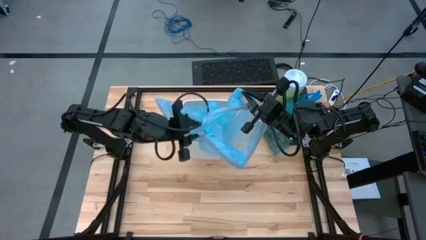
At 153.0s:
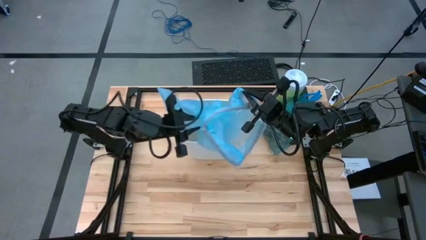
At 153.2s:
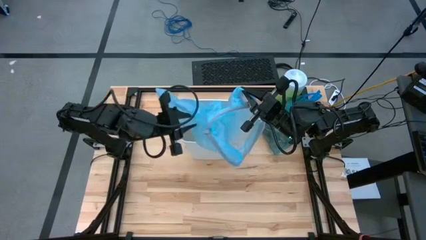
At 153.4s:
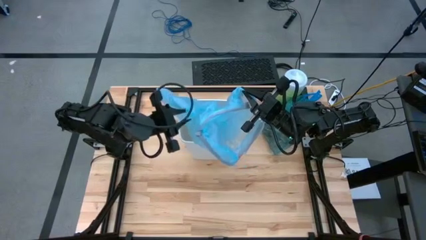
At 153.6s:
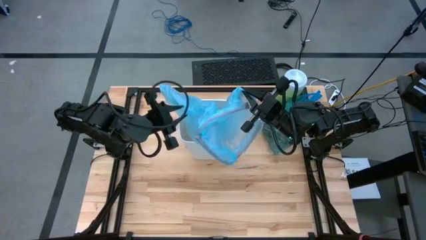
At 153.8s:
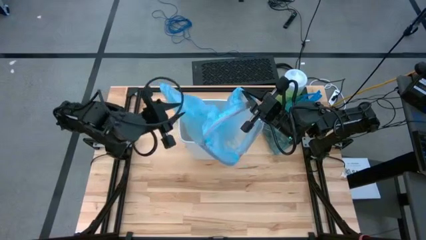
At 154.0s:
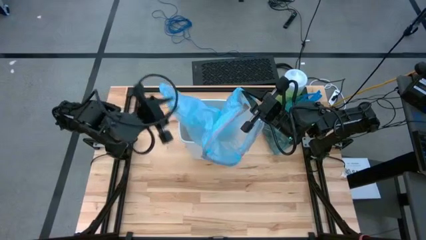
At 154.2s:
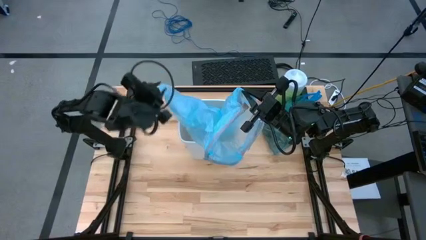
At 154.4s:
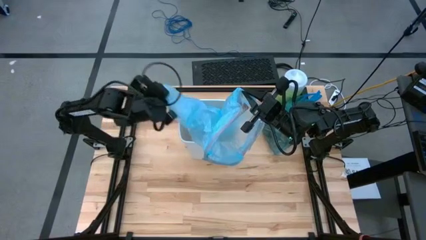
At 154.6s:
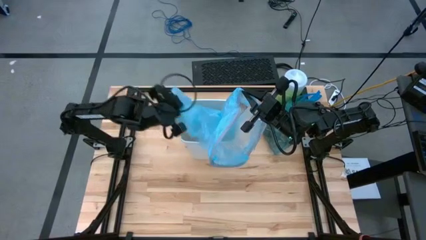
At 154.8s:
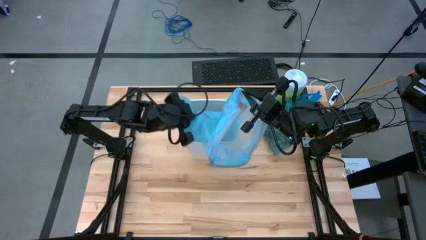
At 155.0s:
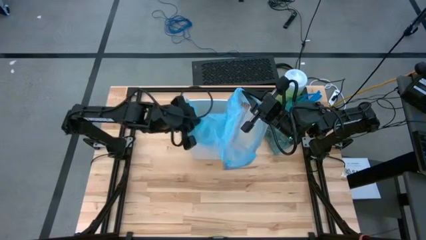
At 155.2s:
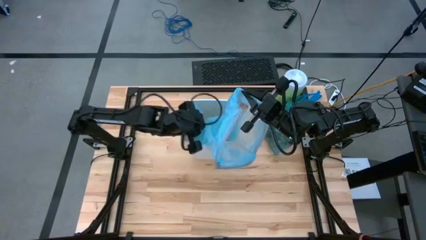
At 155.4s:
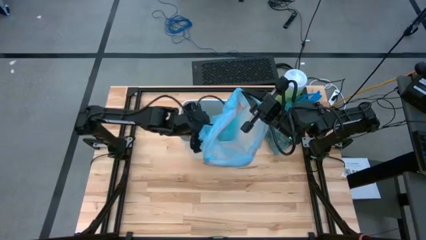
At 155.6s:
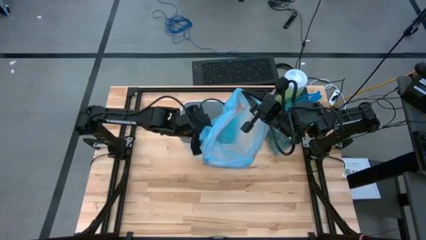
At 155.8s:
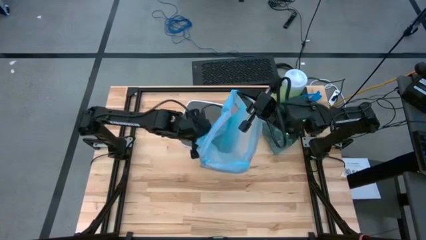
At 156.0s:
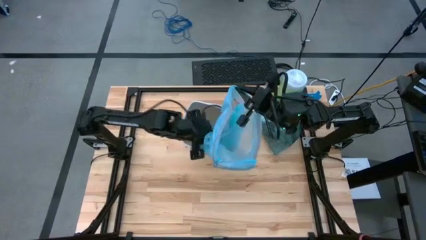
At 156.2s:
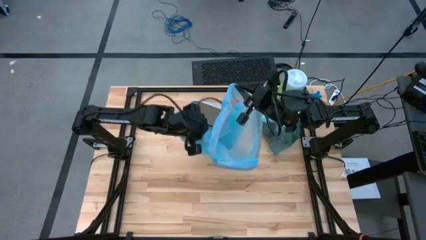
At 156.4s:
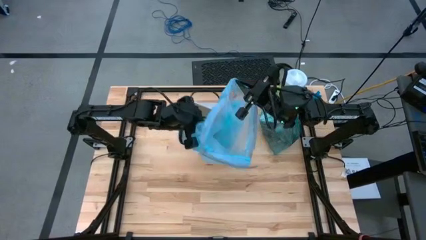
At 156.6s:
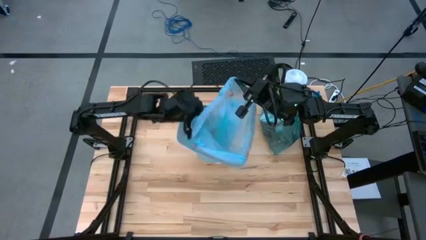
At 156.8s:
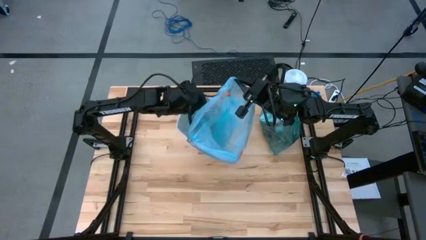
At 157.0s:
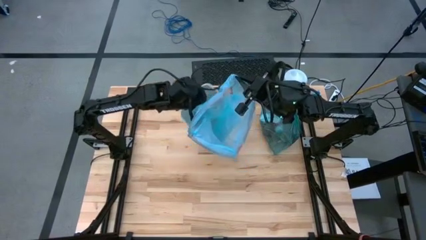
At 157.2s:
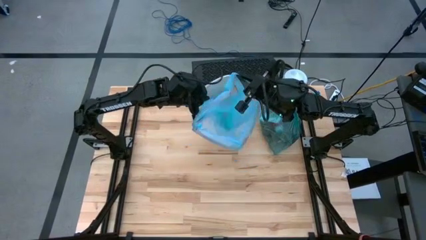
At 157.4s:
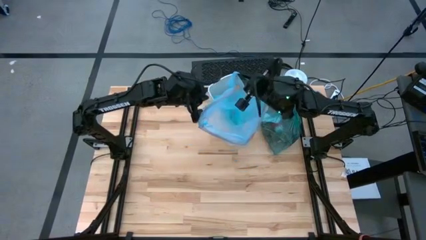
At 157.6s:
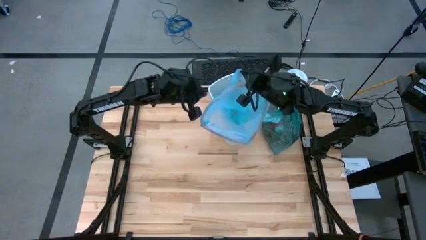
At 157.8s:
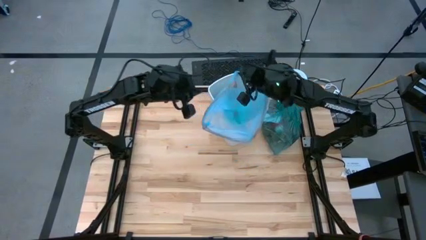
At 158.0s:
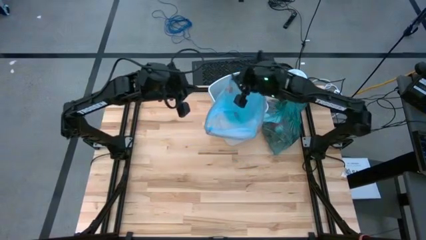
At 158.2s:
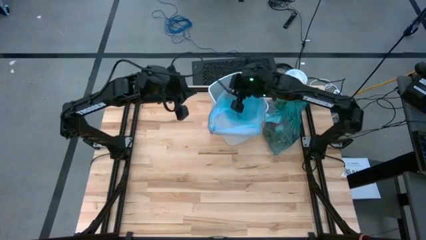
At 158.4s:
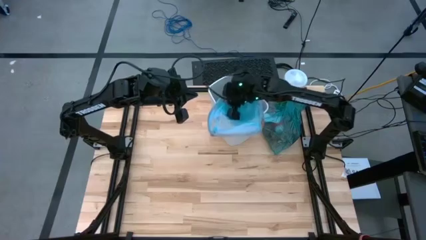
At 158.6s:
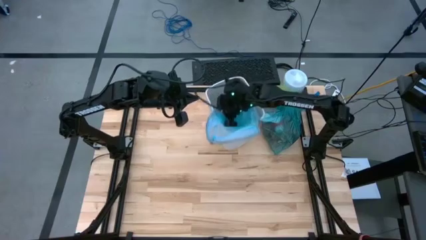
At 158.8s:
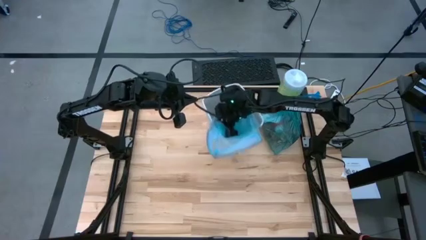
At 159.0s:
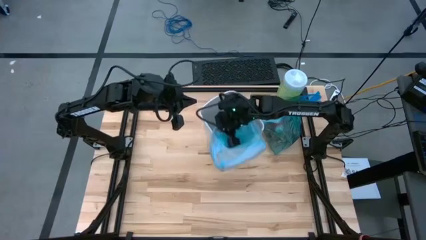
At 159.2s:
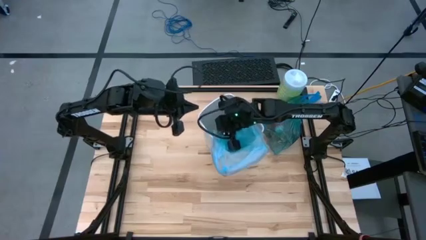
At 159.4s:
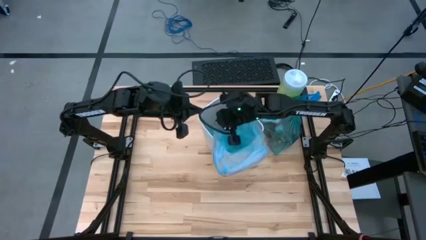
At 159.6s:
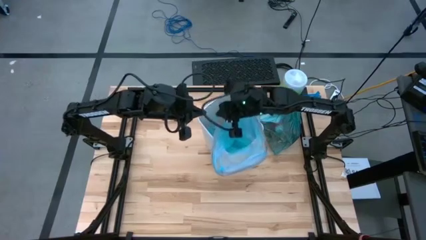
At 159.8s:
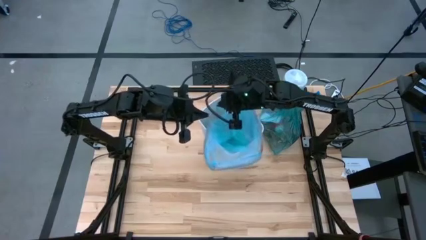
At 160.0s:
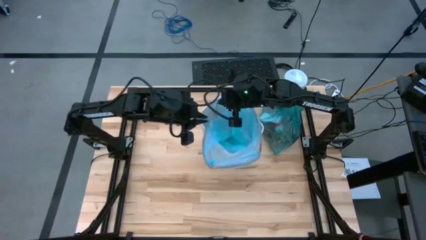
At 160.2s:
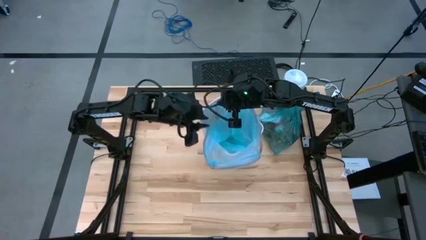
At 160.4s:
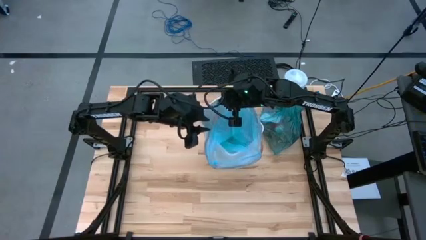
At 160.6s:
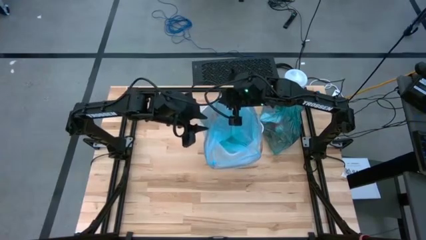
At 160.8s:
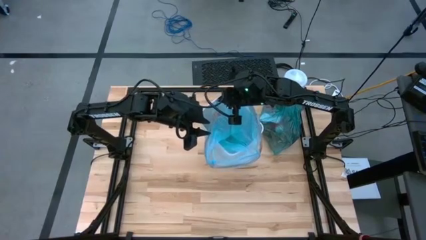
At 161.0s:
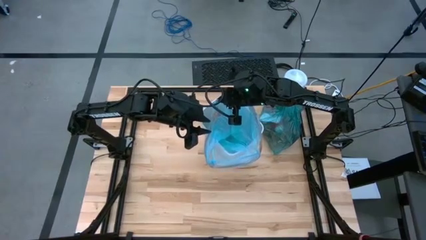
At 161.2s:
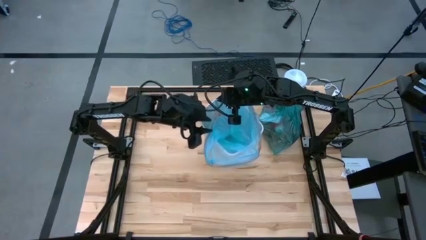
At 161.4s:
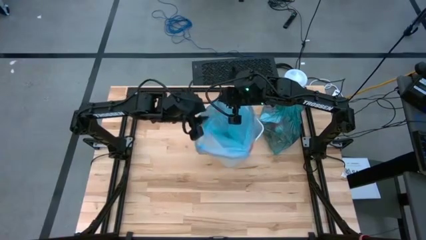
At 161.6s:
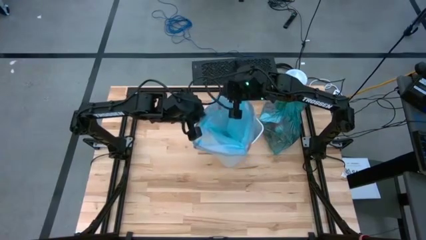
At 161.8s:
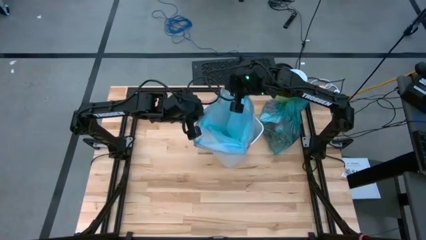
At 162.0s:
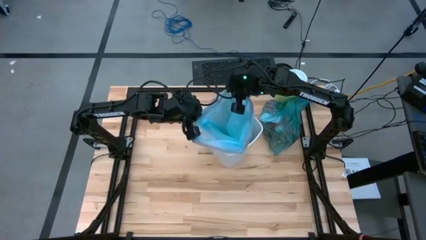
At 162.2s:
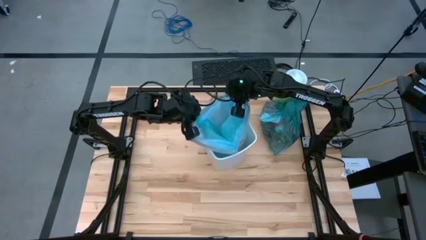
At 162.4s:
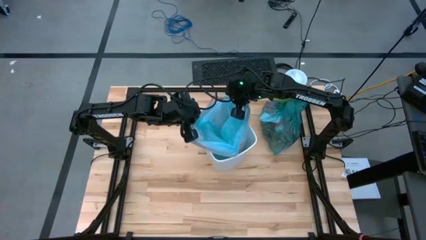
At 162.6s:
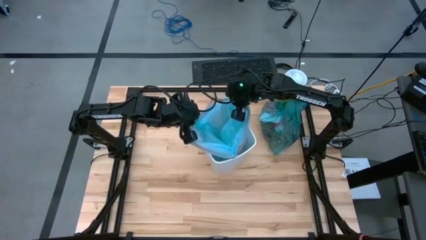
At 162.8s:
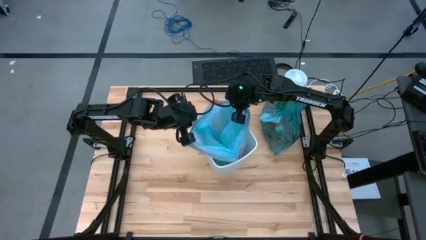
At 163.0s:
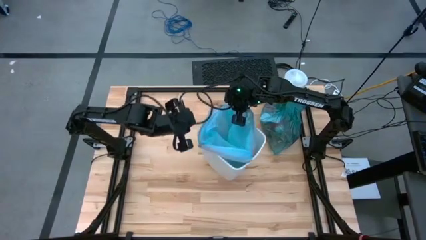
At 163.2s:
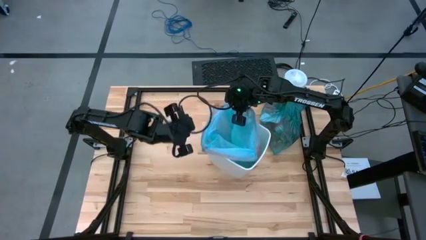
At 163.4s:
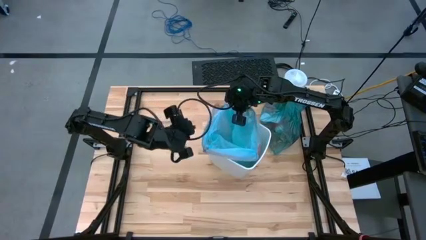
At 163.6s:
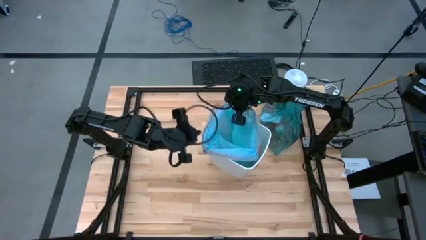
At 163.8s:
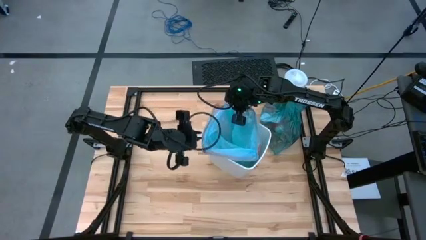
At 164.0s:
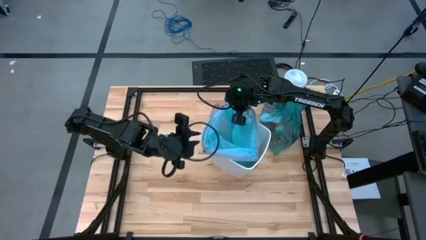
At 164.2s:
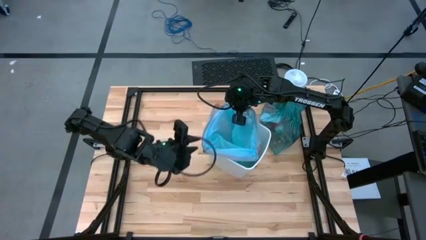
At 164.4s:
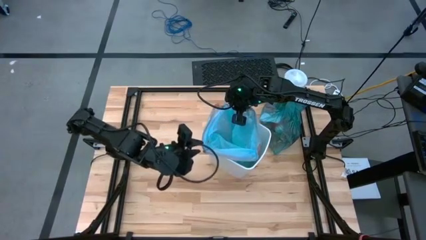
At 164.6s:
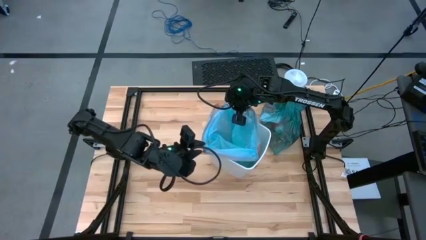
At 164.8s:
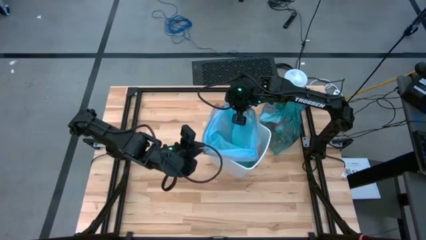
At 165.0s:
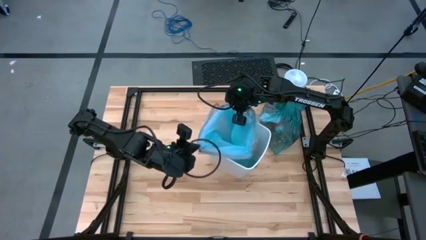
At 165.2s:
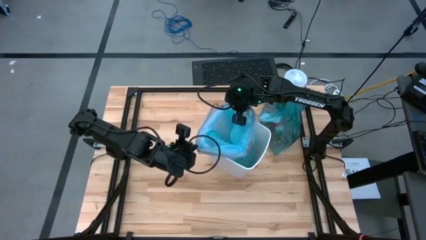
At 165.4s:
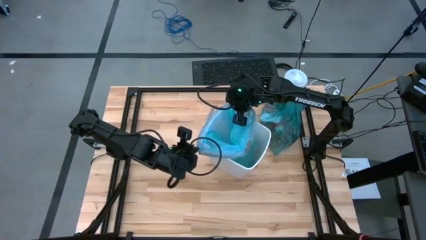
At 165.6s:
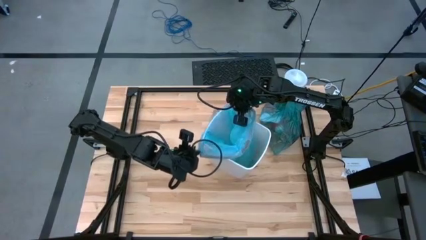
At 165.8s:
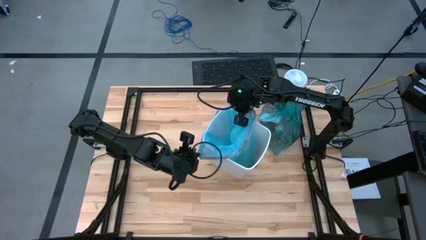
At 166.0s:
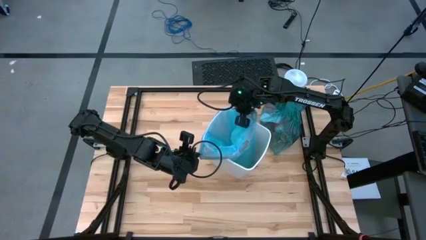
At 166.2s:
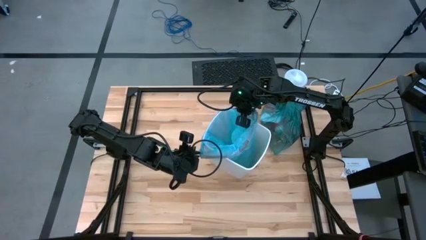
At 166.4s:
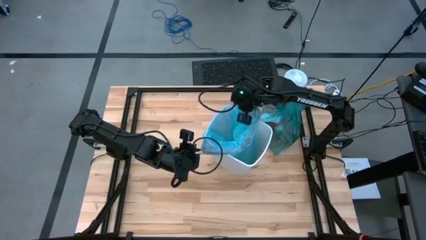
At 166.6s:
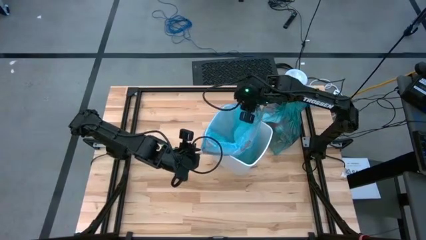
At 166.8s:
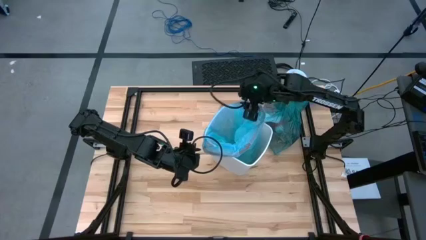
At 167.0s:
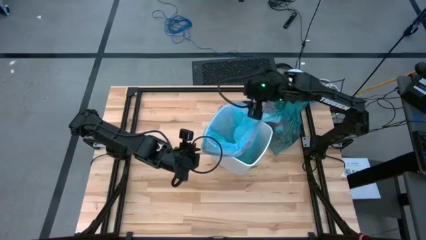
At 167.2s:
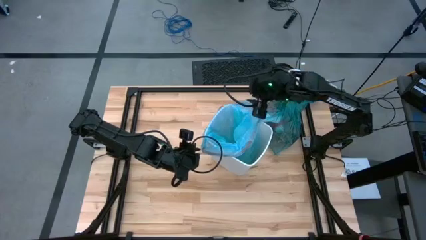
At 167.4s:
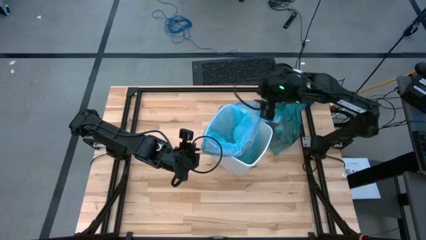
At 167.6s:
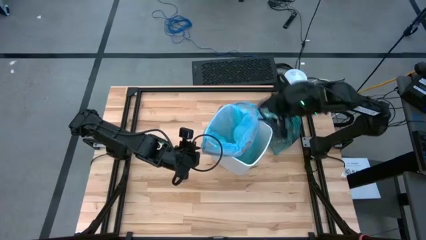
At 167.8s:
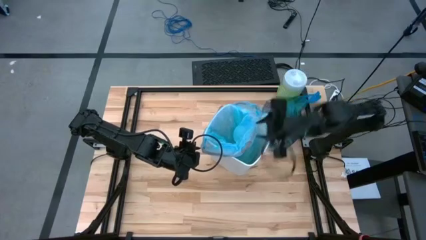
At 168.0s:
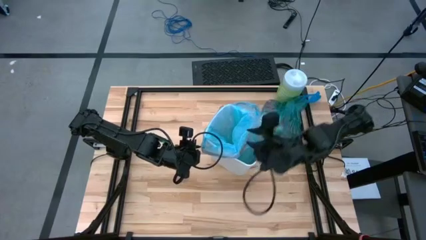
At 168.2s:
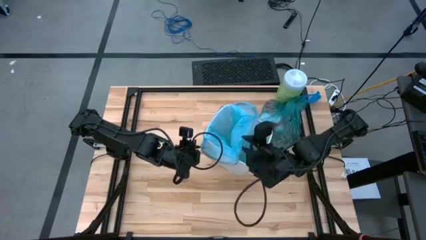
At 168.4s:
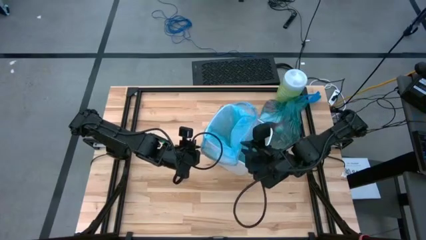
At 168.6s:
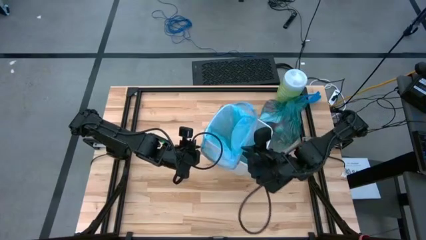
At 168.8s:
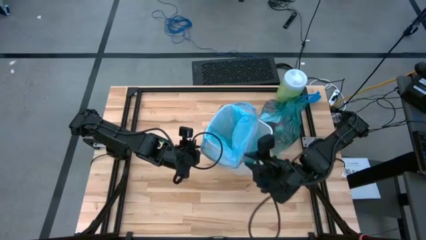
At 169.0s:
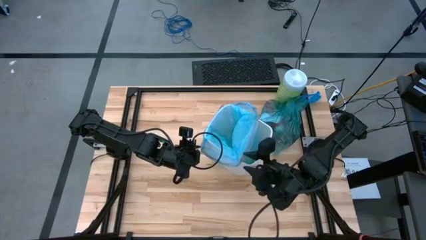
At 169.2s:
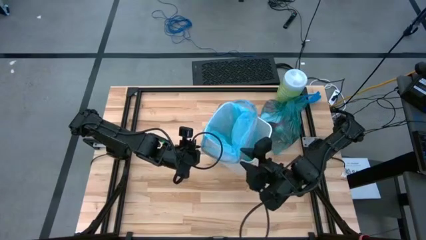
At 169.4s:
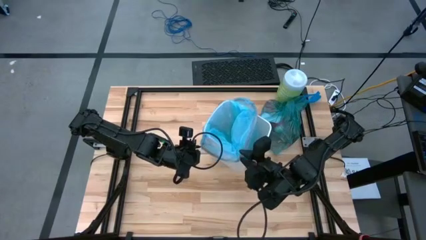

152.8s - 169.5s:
Task: place trash/remove bag and relplace
Put the new blue trash bag inside the white trash bin
